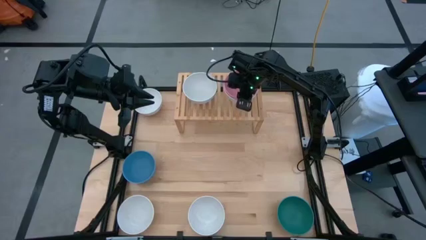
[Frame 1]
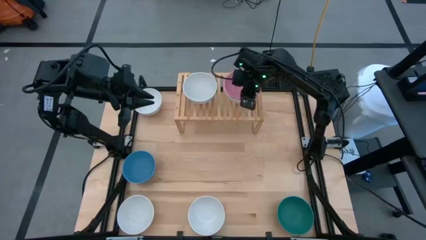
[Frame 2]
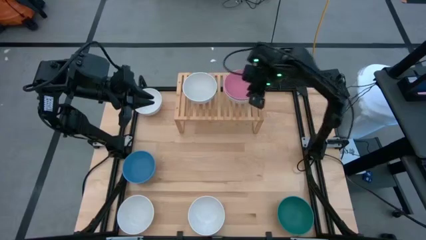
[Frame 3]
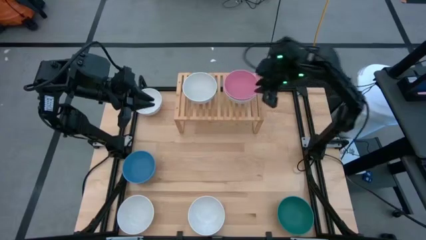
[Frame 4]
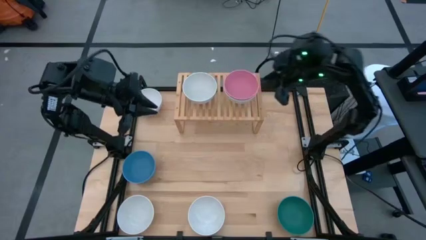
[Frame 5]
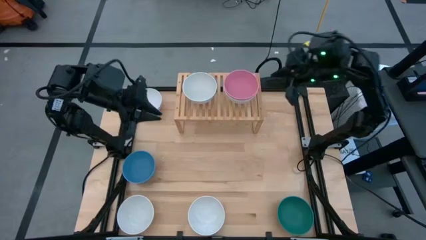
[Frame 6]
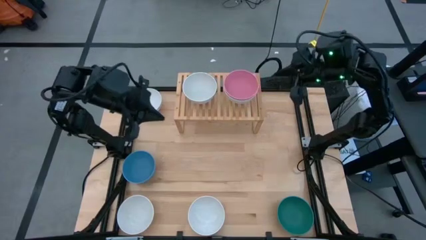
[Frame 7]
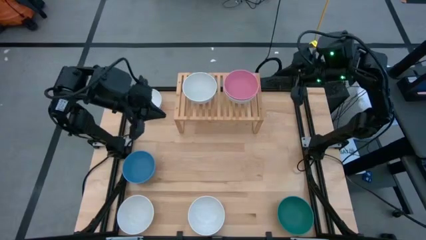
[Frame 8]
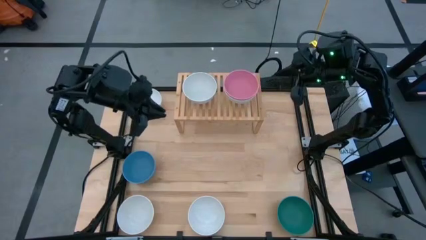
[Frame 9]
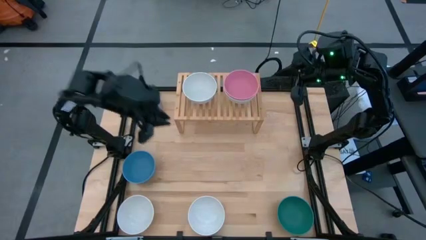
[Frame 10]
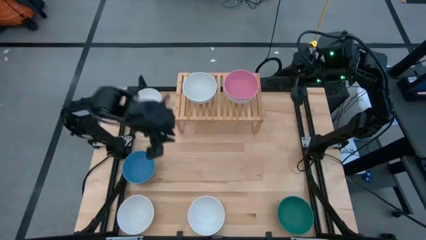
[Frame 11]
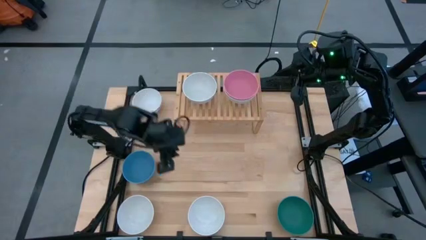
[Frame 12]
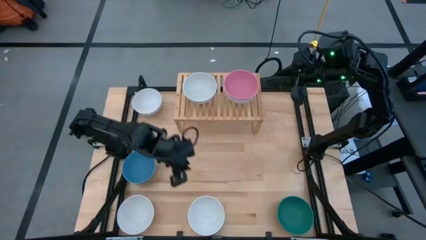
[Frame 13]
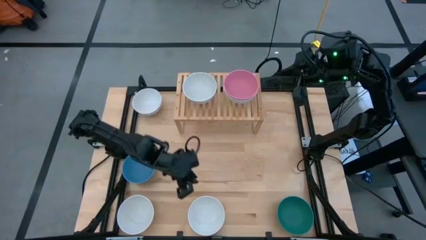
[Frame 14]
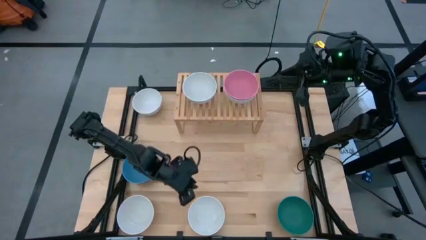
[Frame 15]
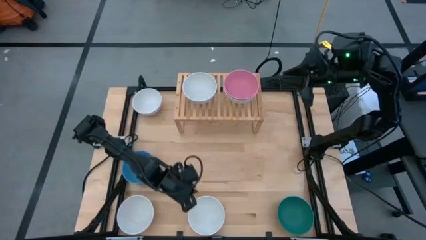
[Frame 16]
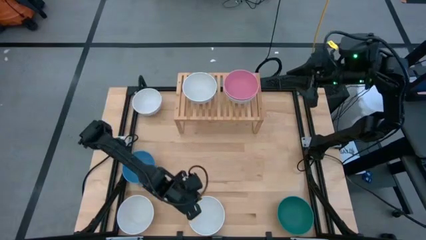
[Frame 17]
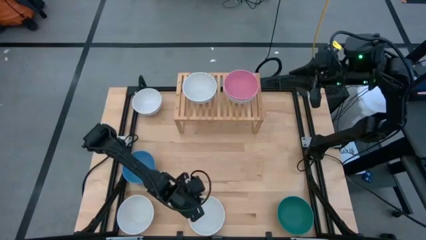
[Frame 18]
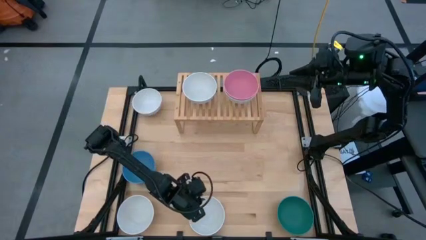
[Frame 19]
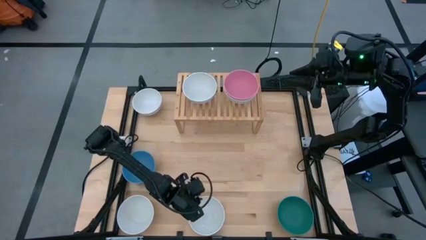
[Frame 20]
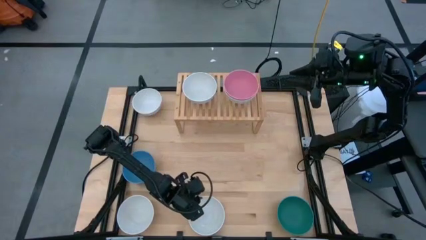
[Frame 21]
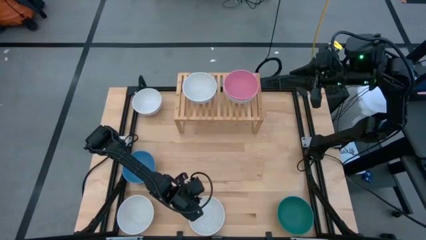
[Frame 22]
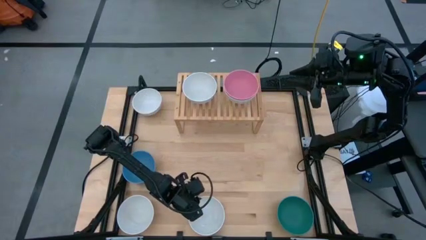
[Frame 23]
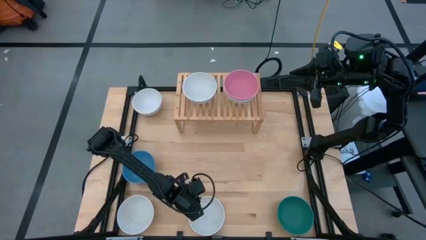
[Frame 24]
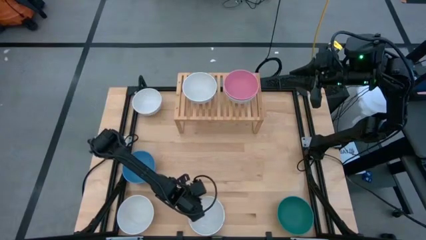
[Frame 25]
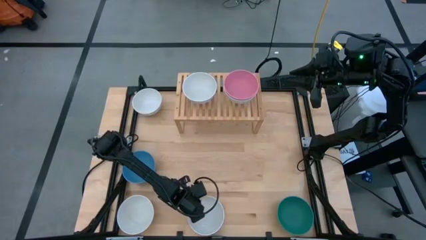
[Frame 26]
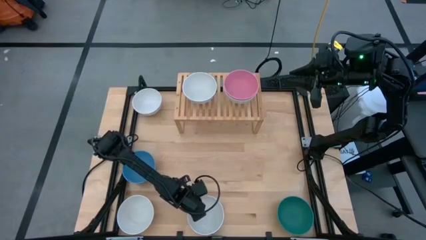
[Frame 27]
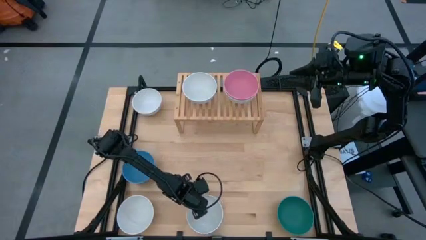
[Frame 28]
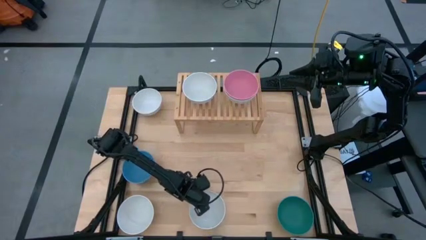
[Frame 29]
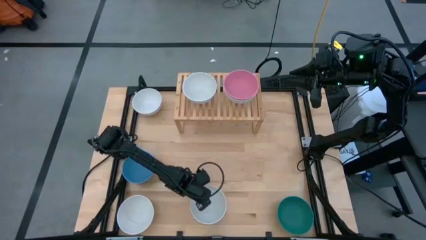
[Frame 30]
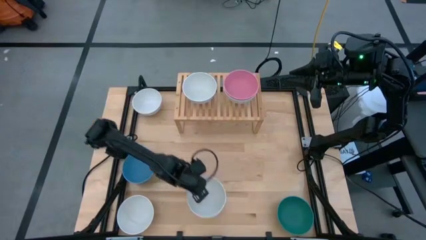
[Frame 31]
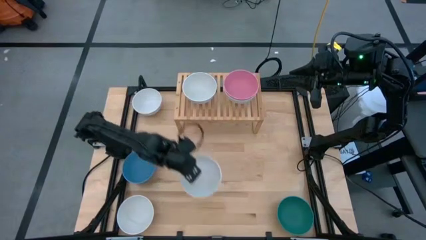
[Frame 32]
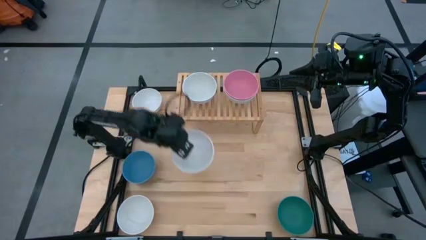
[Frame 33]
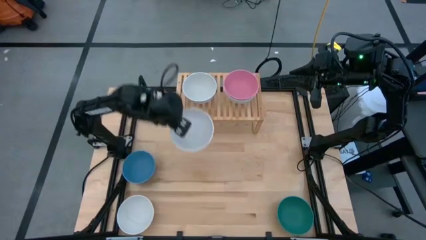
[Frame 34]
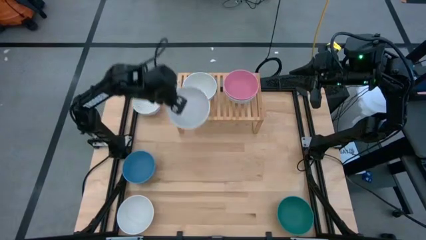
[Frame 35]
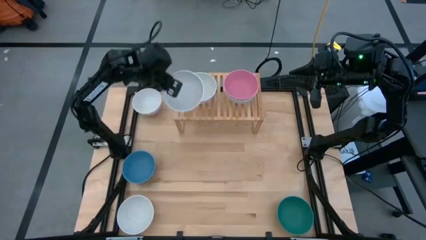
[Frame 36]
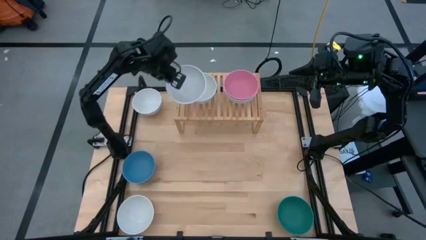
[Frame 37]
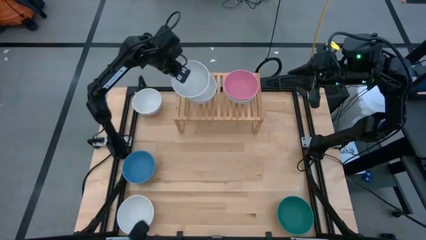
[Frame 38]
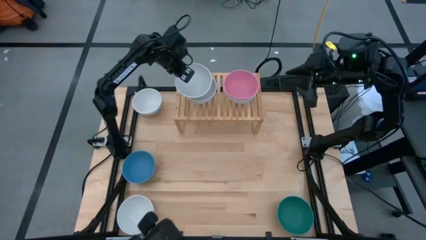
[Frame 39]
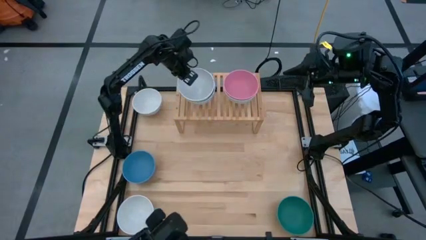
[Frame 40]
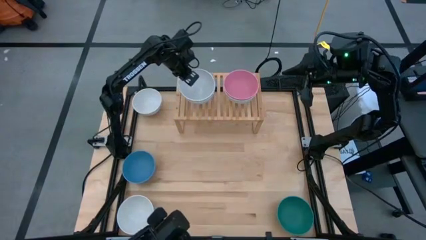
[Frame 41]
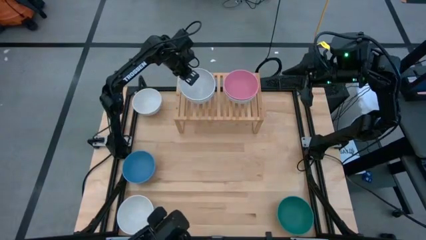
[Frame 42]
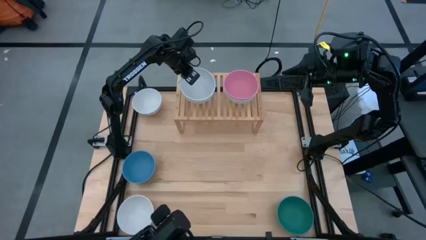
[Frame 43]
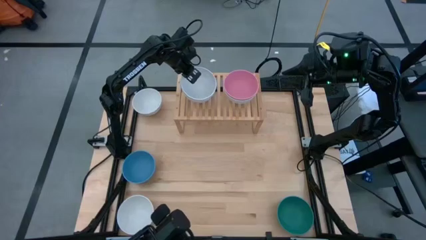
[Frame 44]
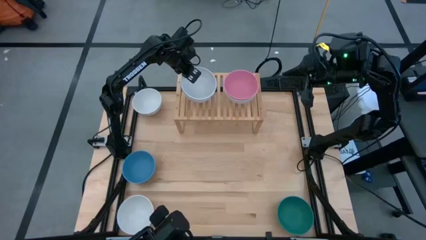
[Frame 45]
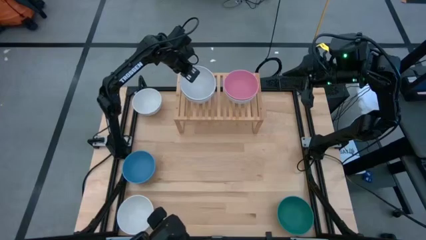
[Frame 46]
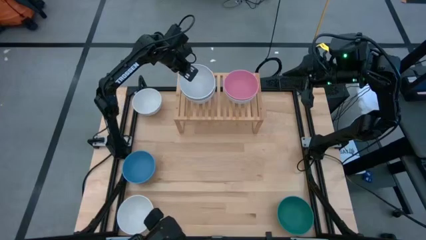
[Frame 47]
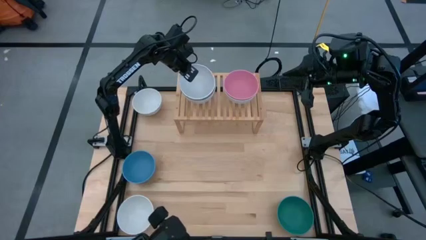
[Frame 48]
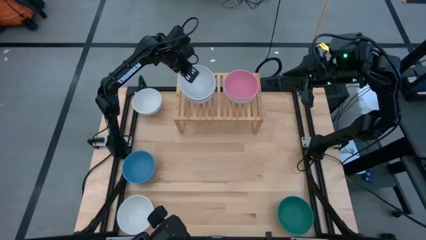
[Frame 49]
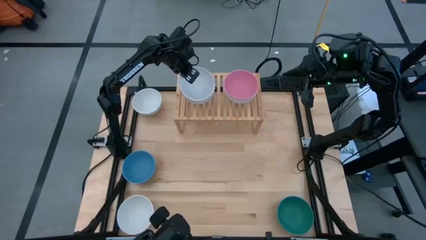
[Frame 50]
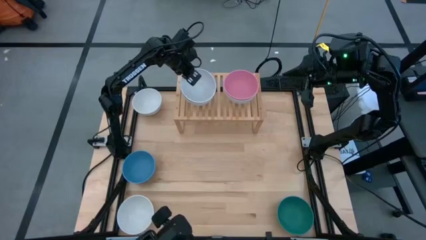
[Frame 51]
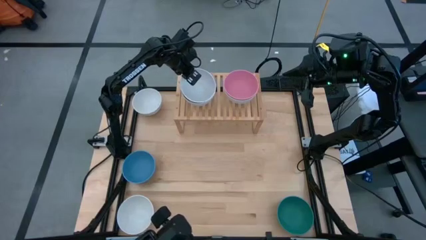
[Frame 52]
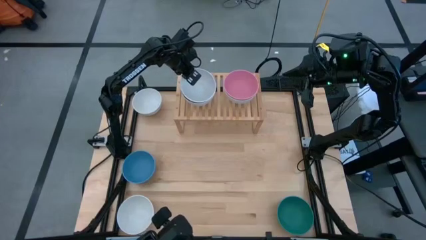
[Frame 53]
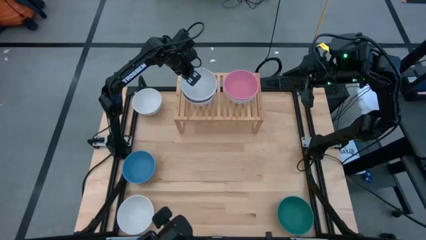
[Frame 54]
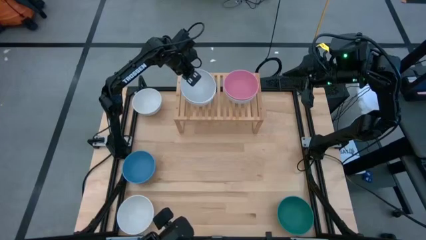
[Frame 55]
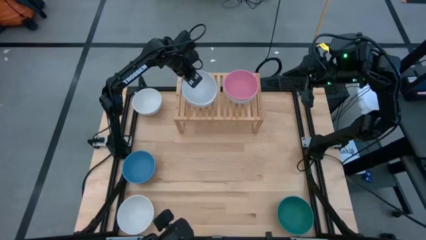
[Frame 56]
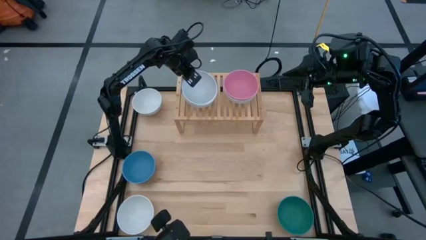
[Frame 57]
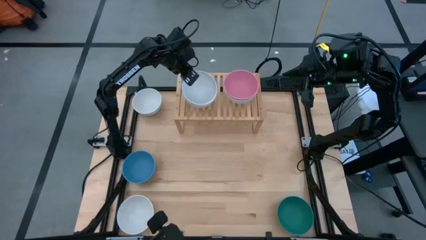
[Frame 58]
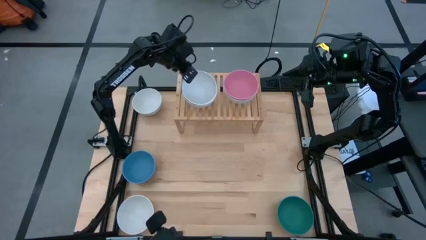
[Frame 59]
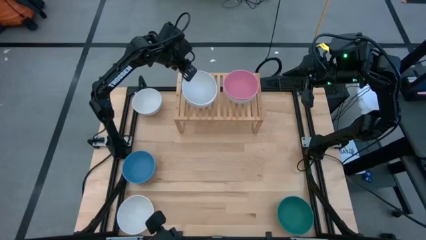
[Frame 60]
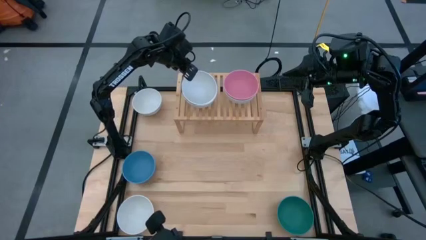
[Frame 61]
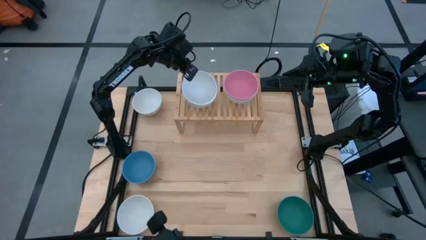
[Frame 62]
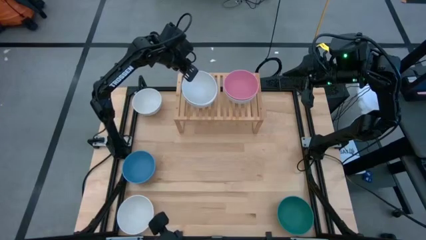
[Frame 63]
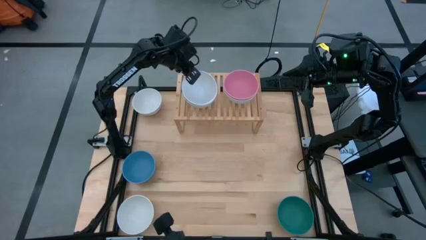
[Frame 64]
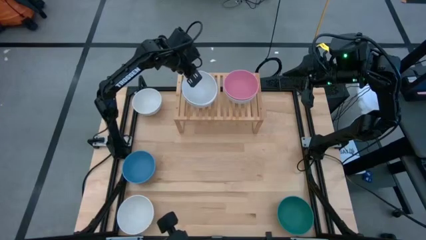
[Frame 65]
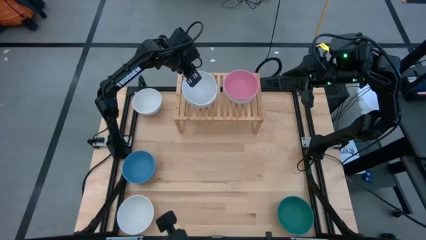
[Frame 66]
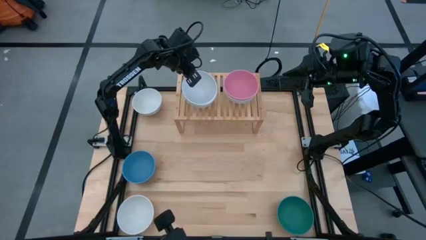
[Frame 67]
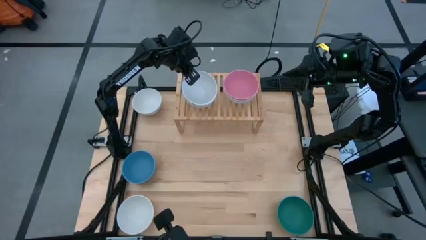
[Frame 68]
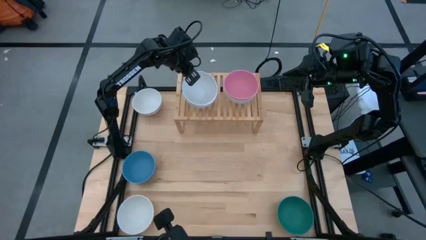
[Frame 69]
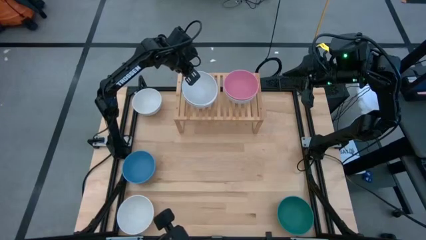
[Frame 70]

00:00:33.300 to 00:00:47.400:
Task: Place and stack bowls onto a shelf
Stack the white bowl on top of the white bowl on the shelf
